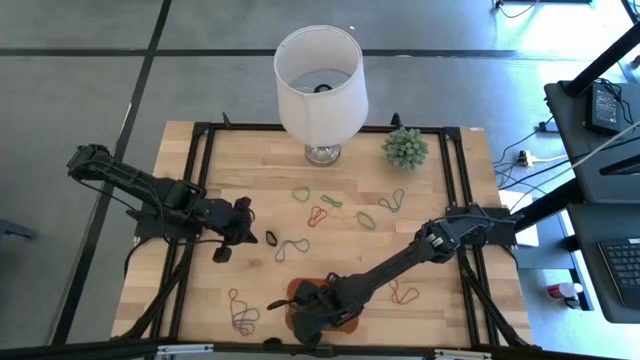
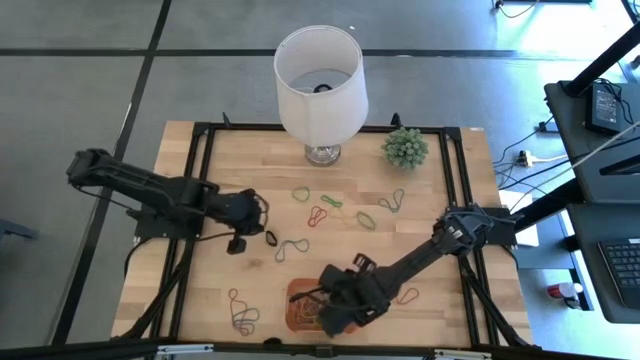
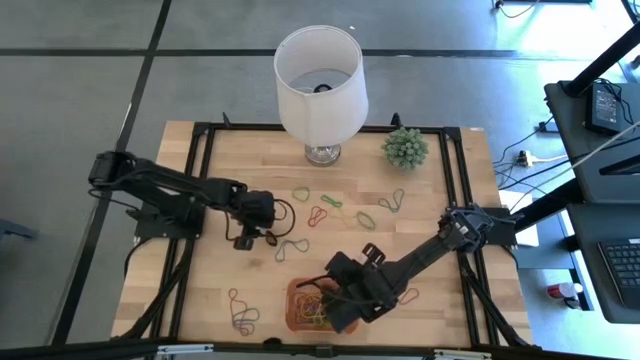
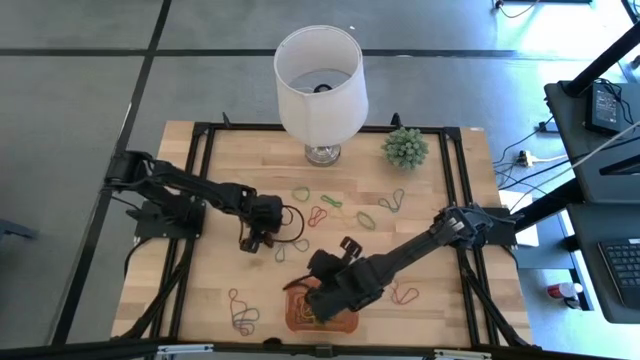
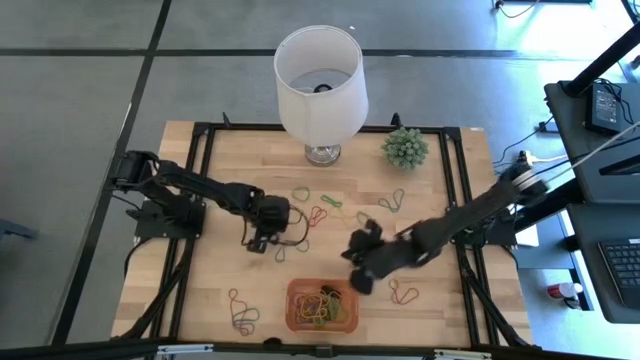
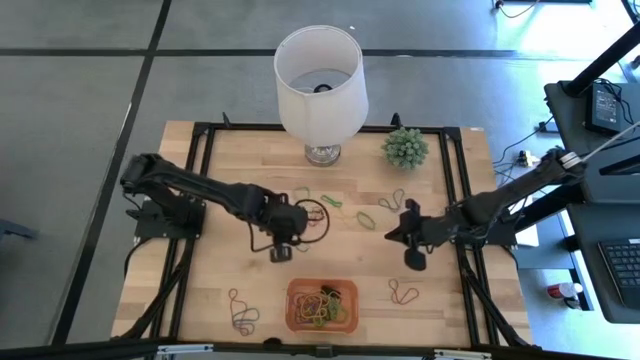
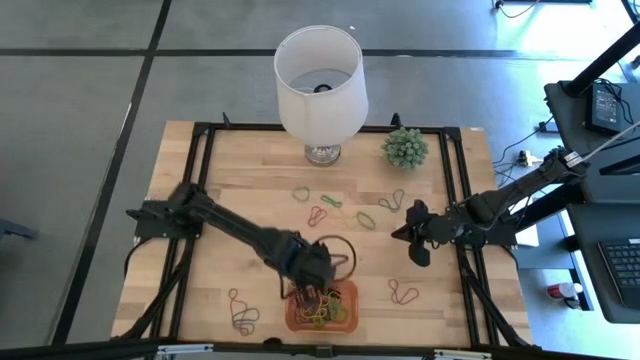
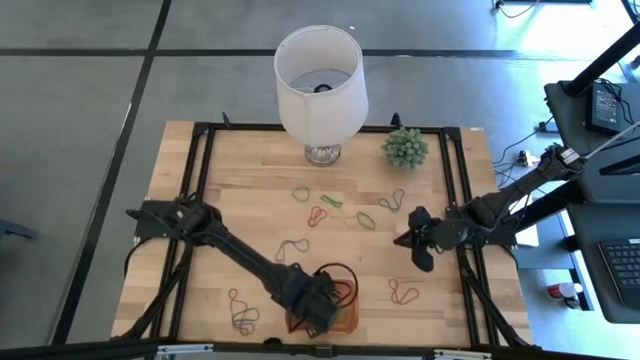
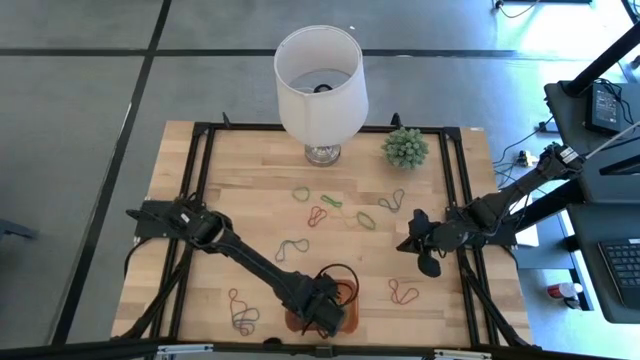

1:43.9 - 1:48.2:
Task: Pick and place rubber bands into bin
Put the black rubber band into the orange bin

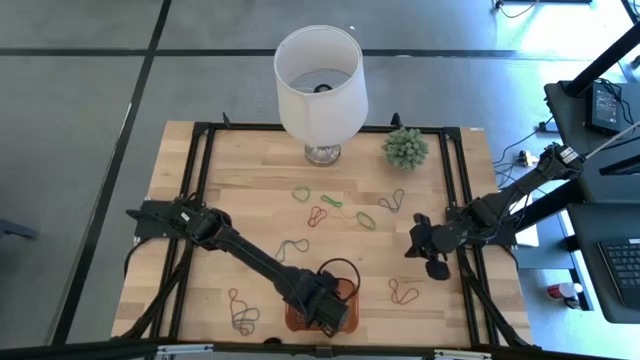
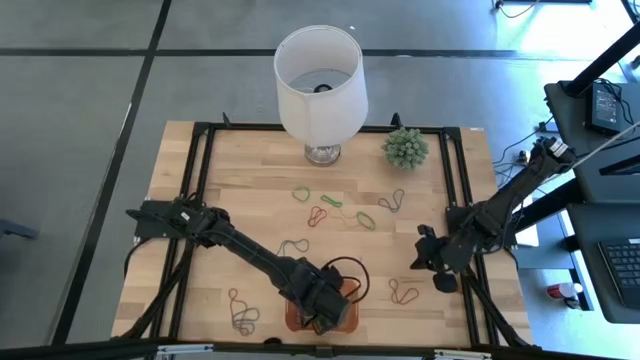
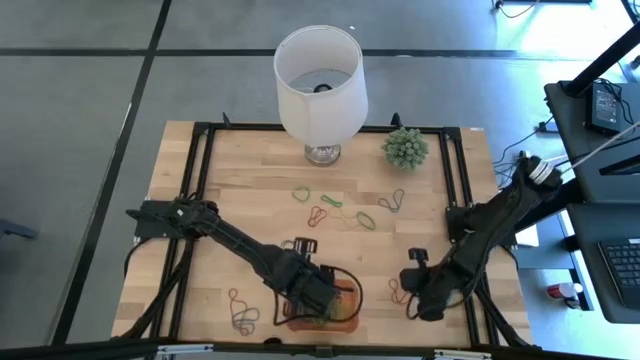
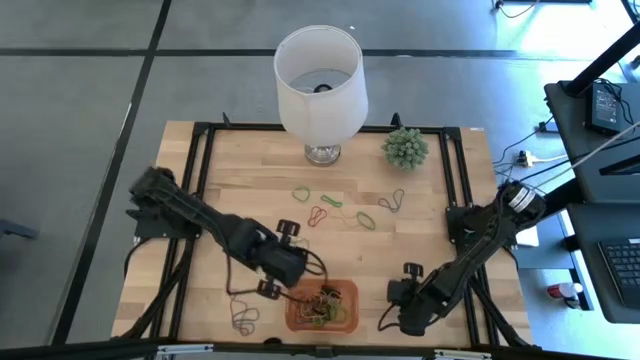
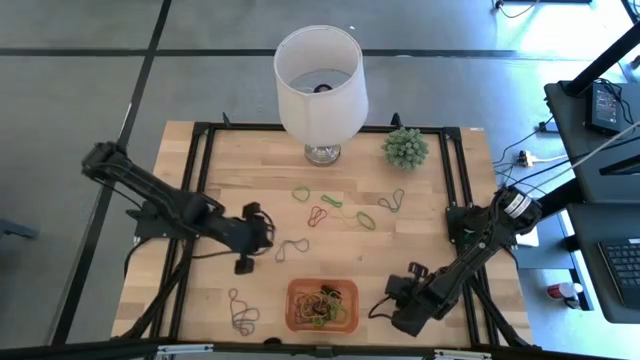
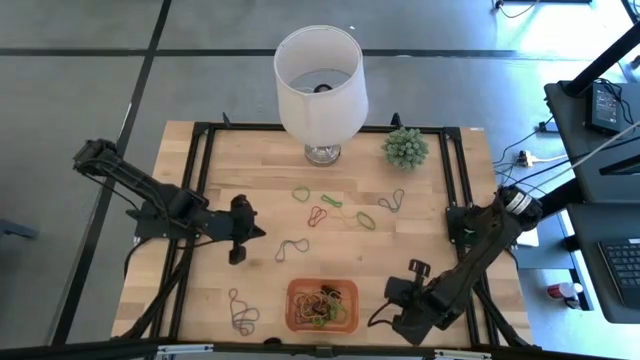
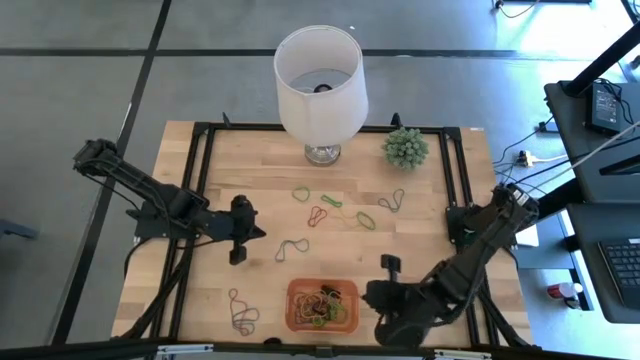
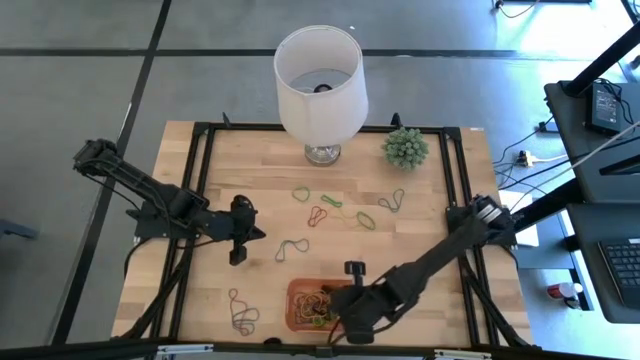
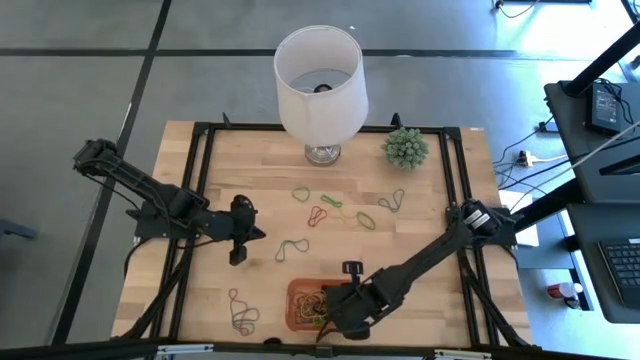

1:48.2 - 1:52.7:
Put the red rubber band into the orange bin

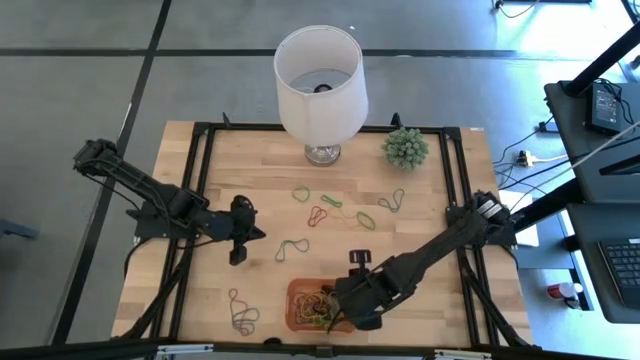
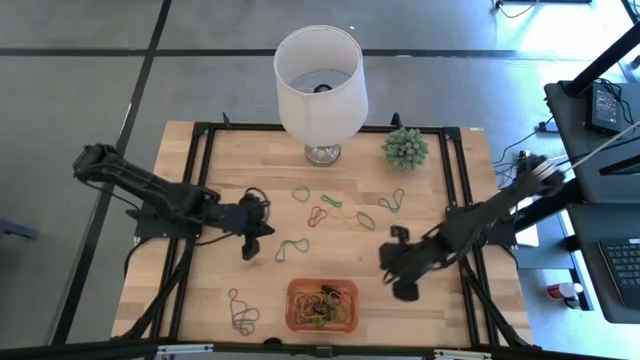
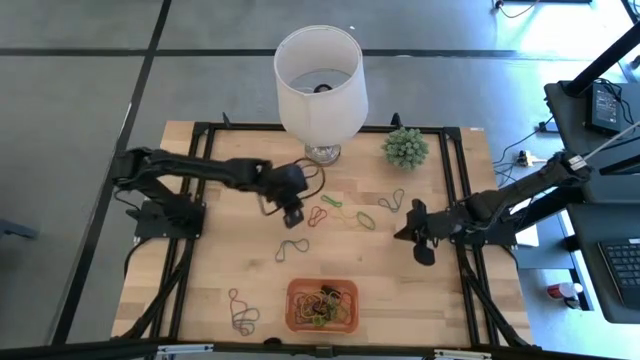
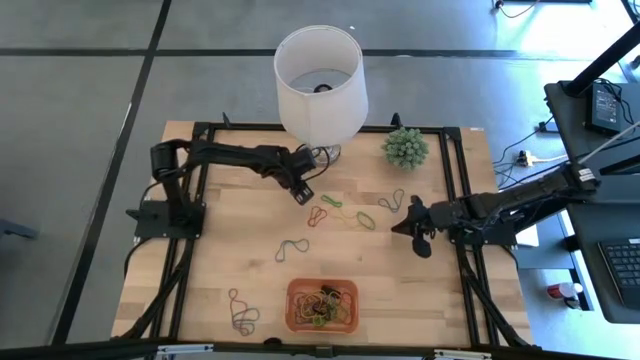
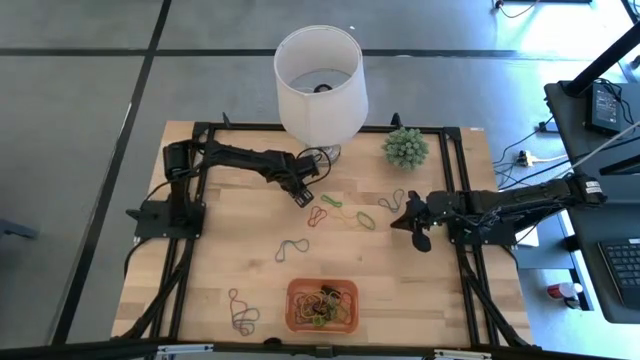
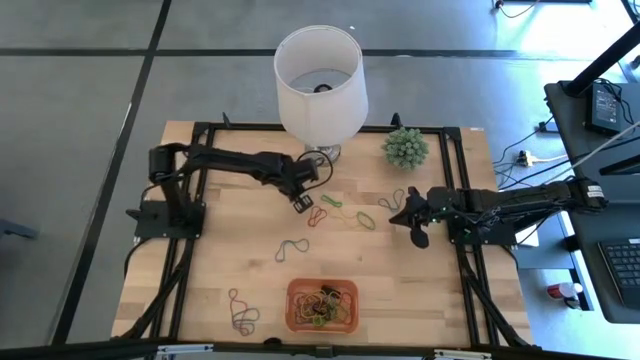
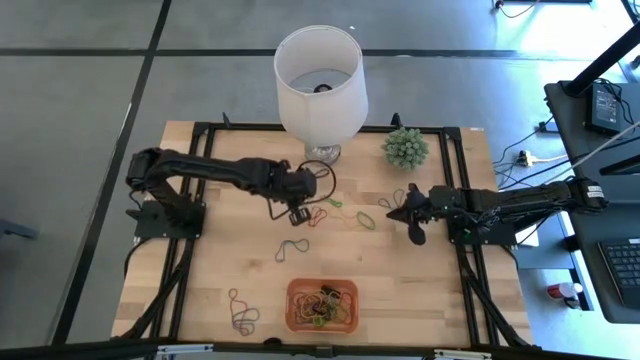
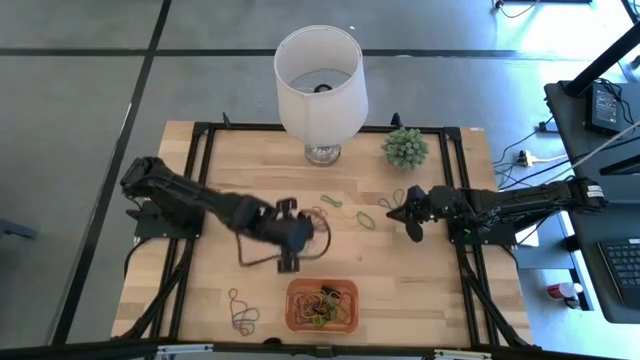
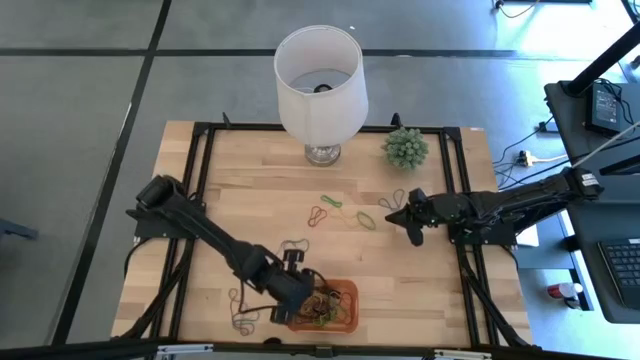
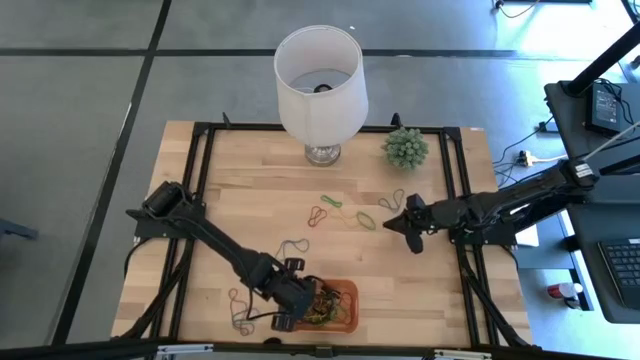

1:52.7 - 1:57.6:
Put the green rubber band into the orange bin

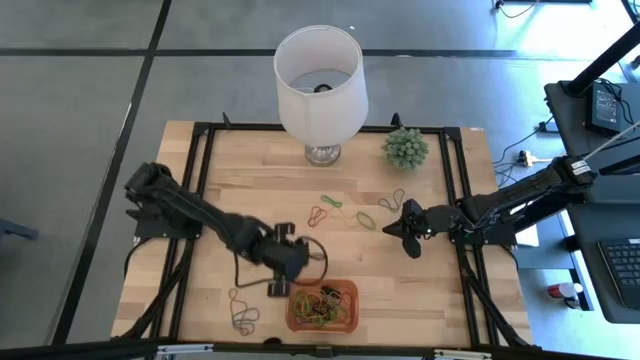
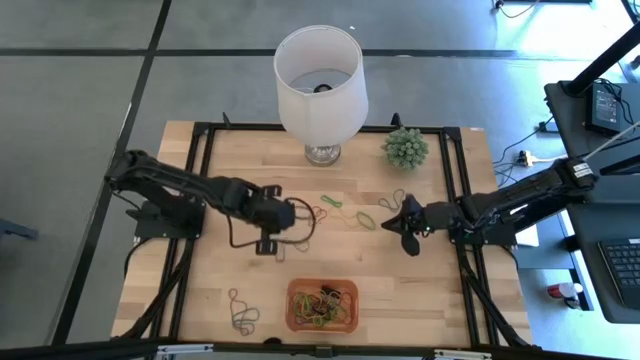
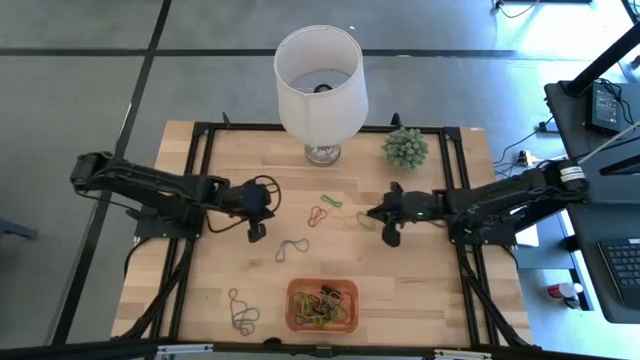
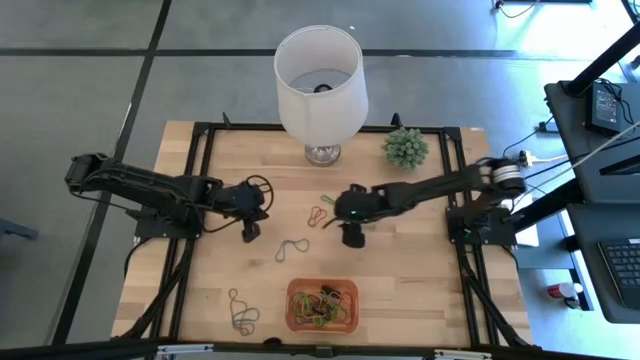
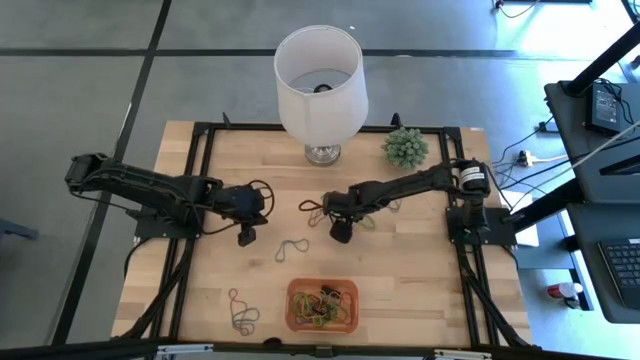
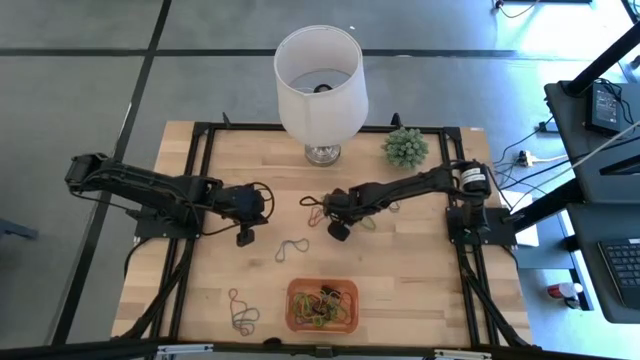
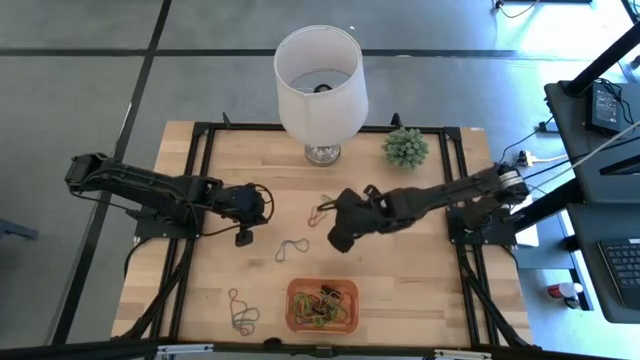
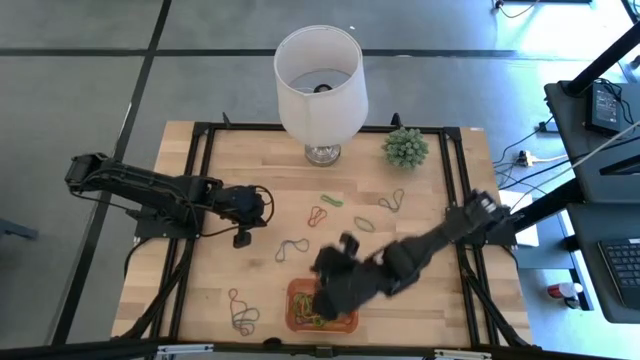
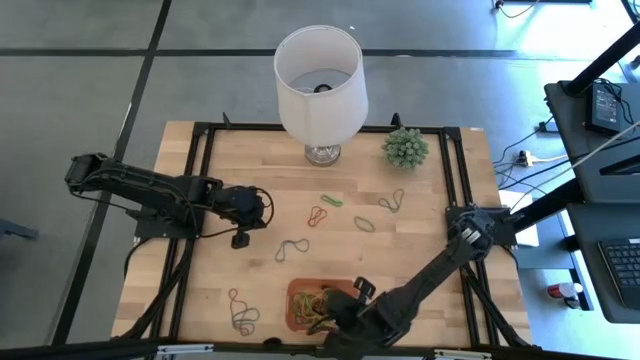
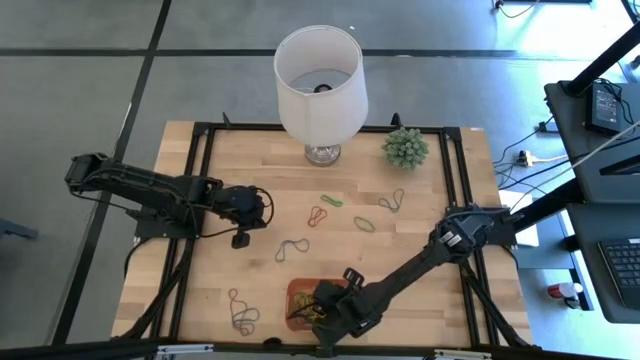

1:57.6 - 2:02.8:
Put the yellow rubber band into the orange bin

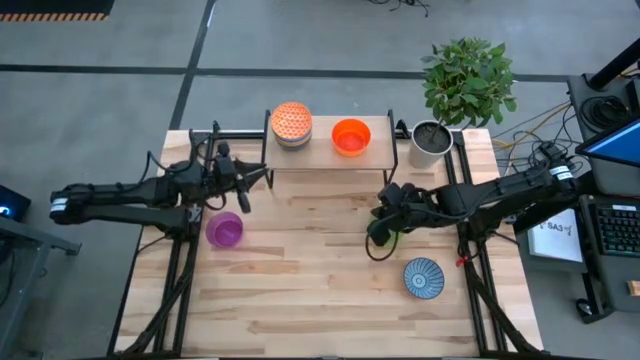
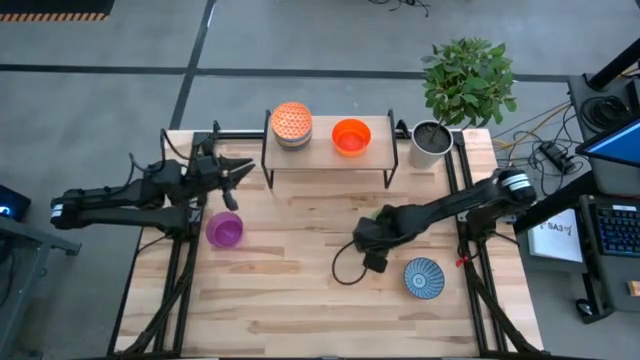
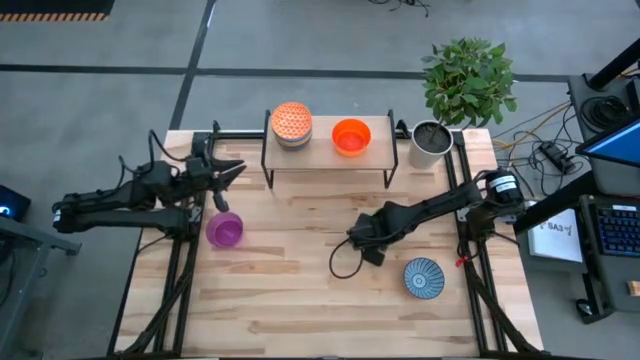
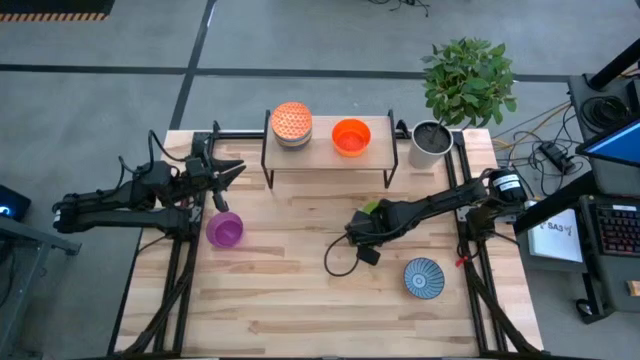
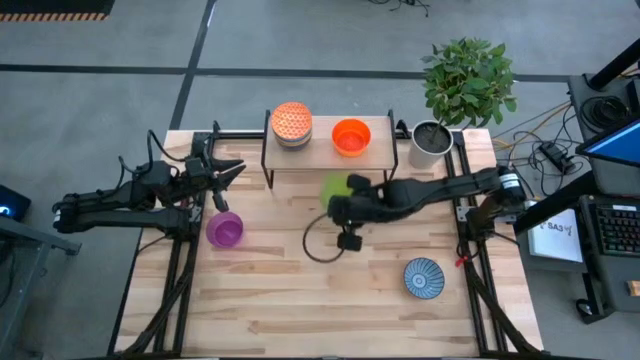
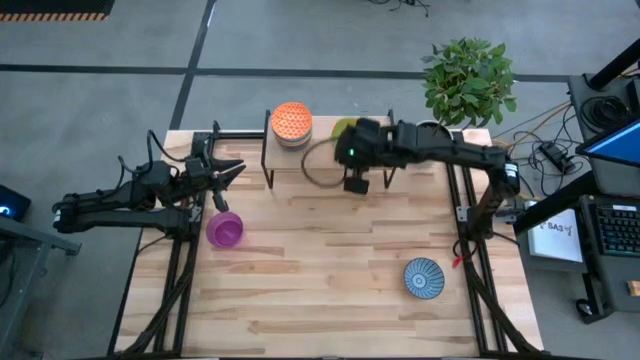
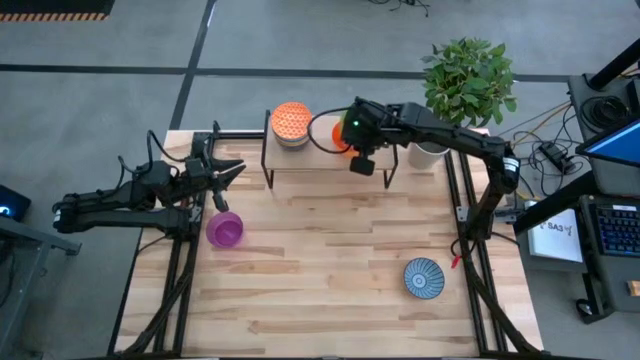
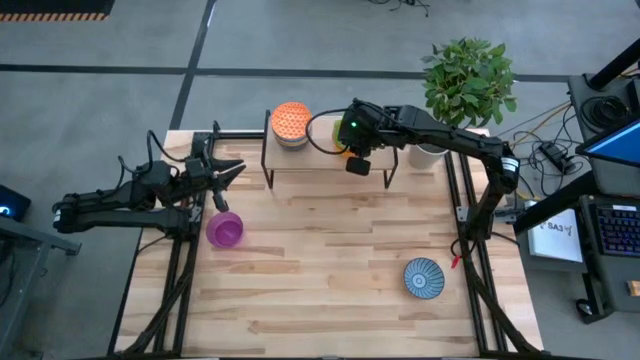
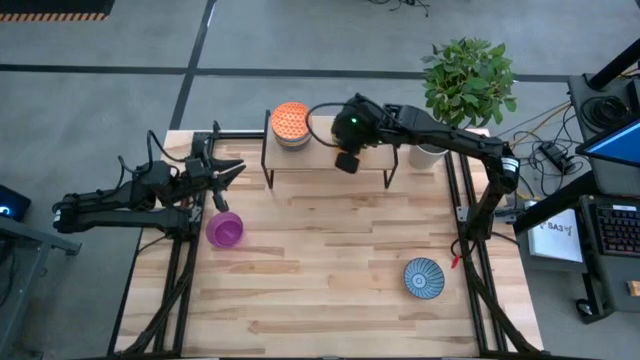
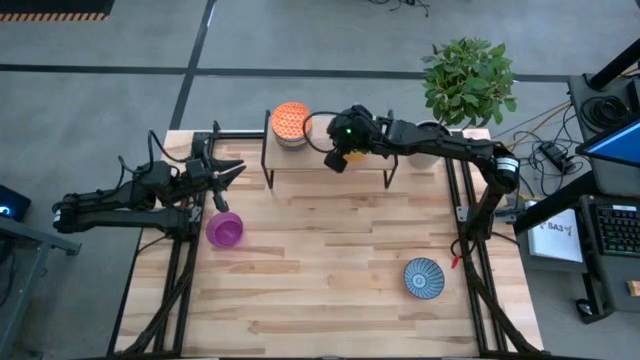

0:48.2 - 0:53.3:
Task: Place and stack bowls onto a shelf
Stack the green bowl on top of the orange bowl on the shelf
